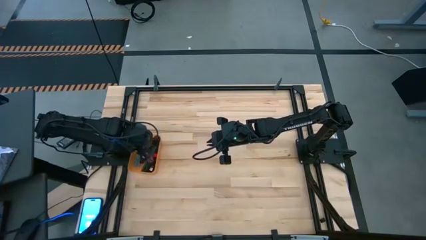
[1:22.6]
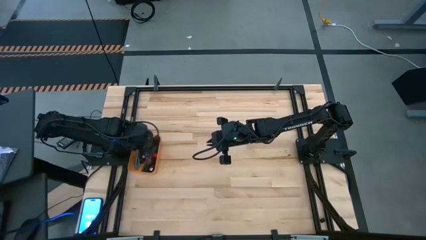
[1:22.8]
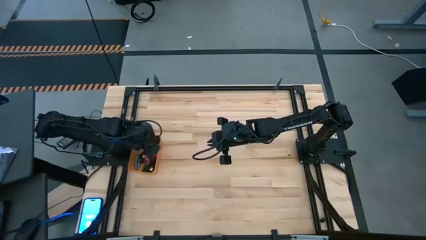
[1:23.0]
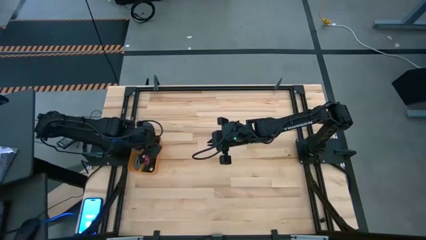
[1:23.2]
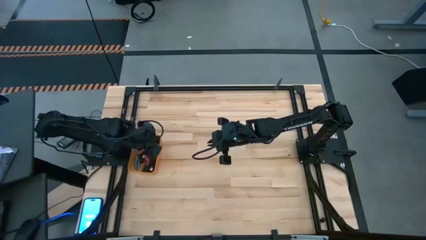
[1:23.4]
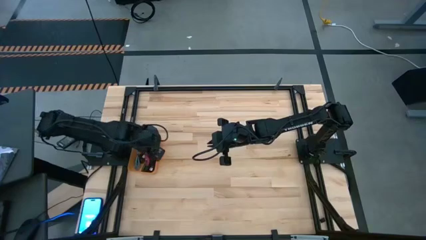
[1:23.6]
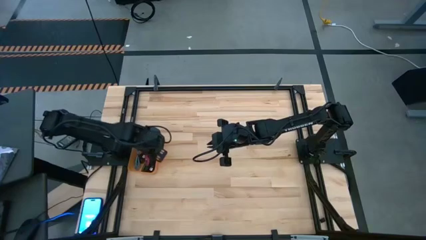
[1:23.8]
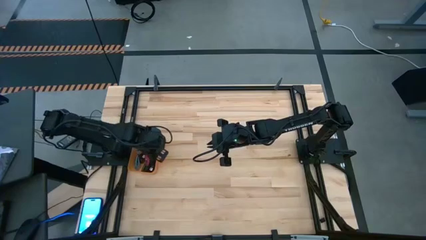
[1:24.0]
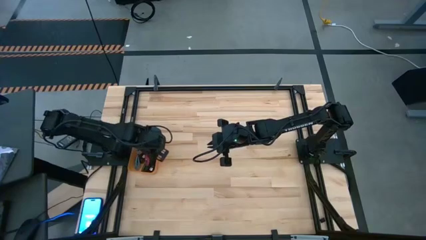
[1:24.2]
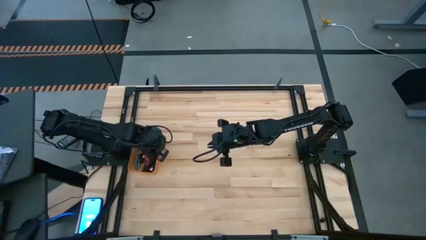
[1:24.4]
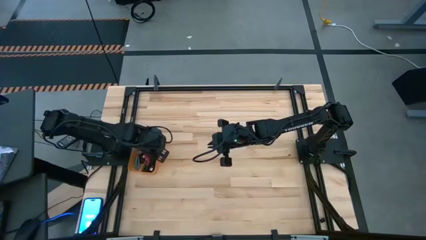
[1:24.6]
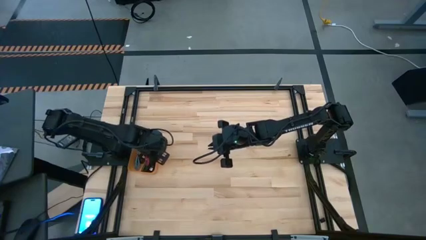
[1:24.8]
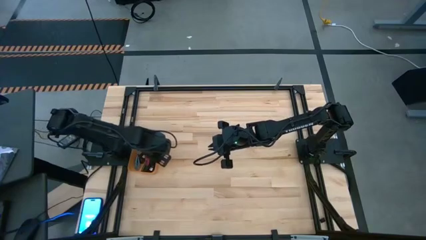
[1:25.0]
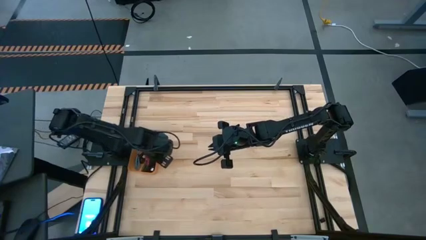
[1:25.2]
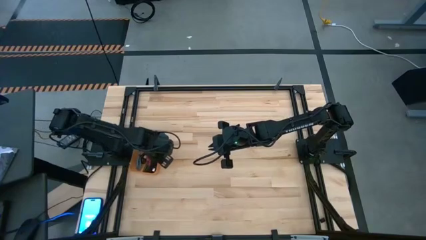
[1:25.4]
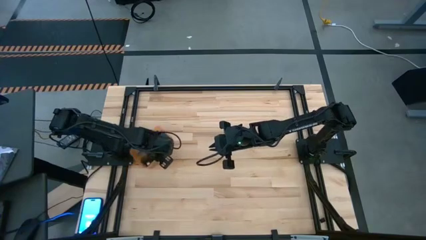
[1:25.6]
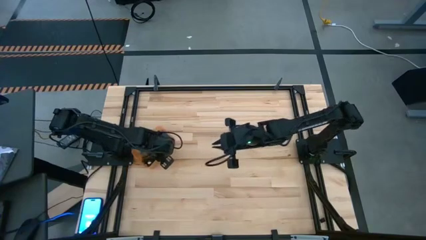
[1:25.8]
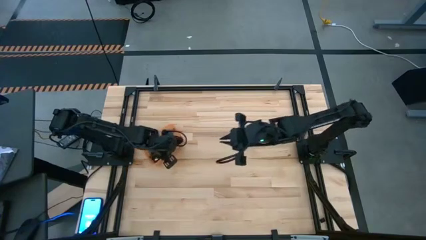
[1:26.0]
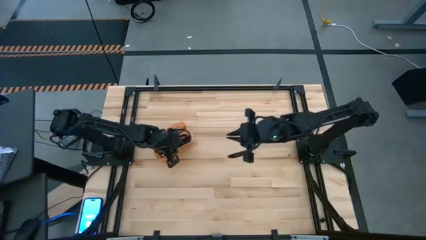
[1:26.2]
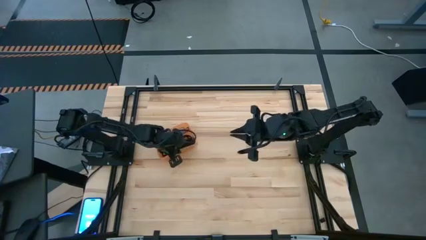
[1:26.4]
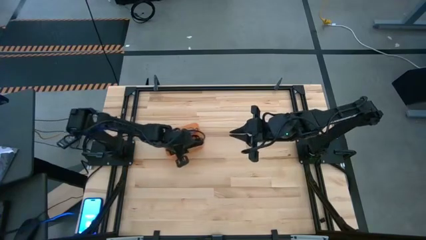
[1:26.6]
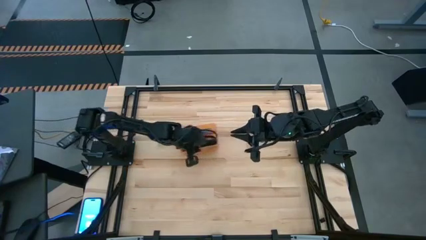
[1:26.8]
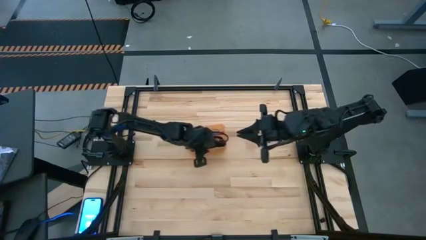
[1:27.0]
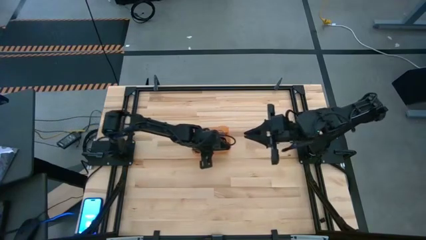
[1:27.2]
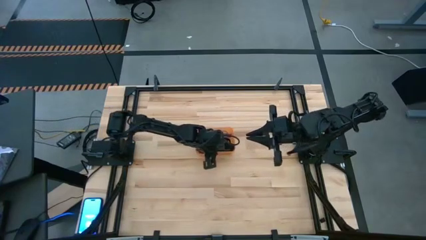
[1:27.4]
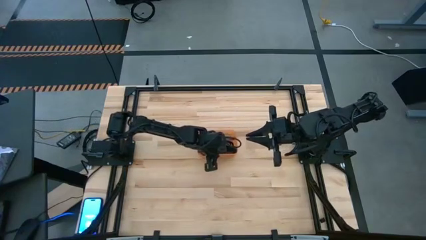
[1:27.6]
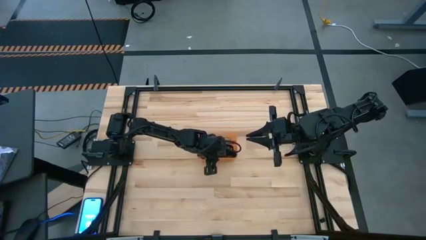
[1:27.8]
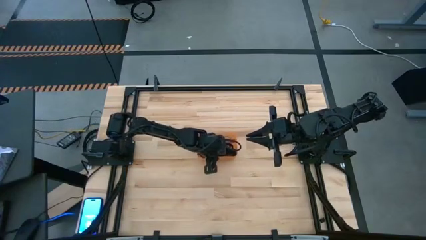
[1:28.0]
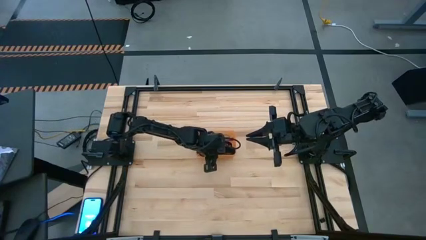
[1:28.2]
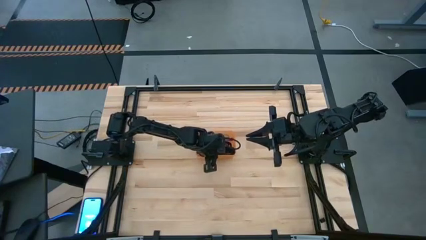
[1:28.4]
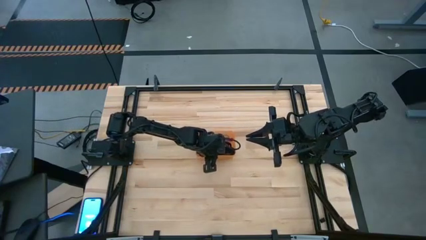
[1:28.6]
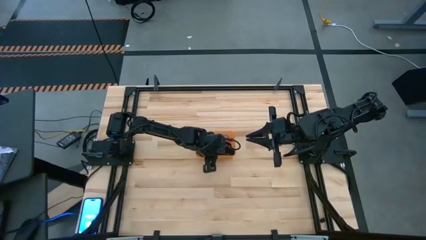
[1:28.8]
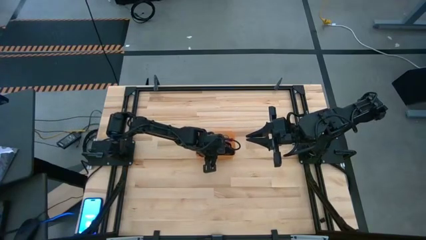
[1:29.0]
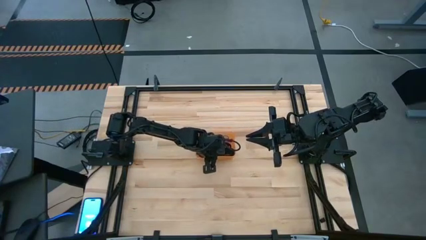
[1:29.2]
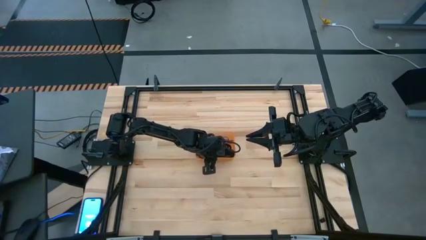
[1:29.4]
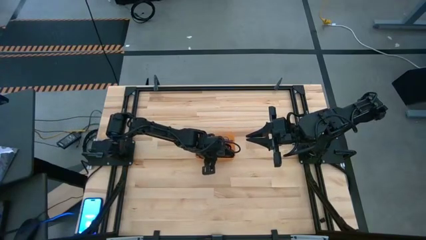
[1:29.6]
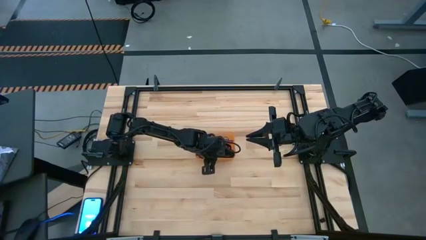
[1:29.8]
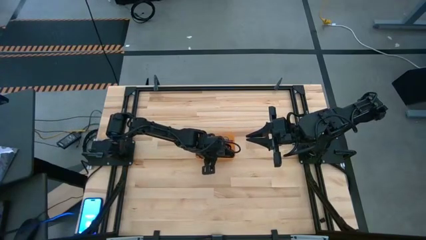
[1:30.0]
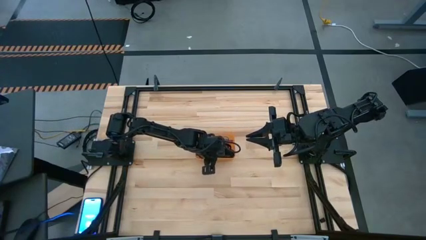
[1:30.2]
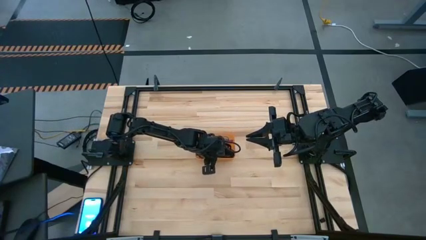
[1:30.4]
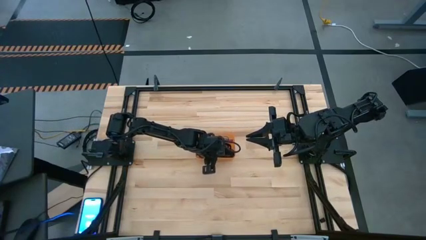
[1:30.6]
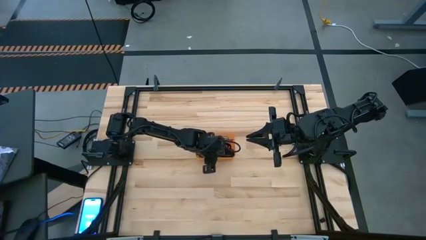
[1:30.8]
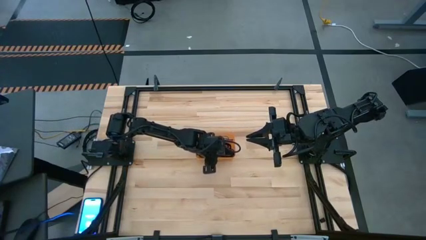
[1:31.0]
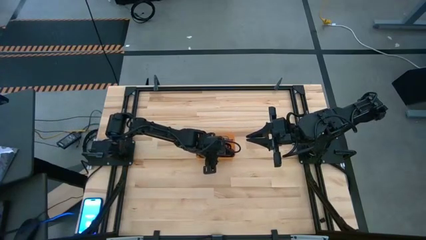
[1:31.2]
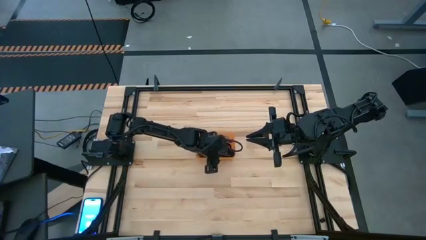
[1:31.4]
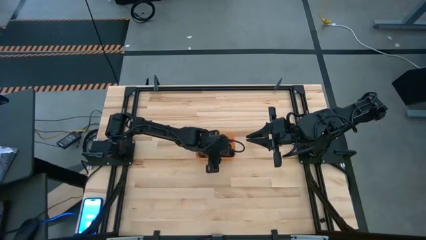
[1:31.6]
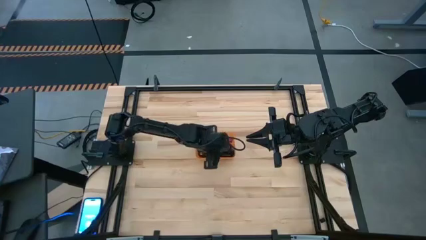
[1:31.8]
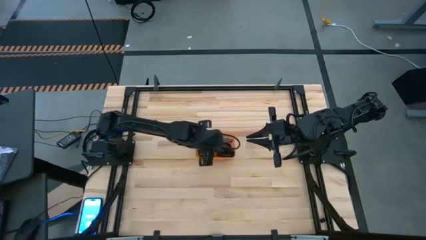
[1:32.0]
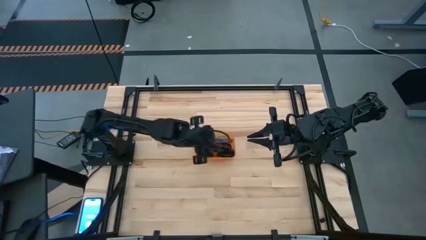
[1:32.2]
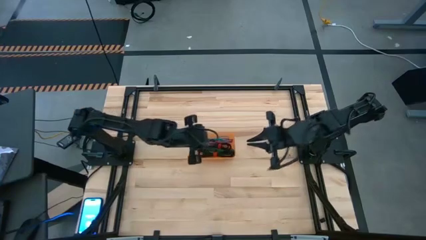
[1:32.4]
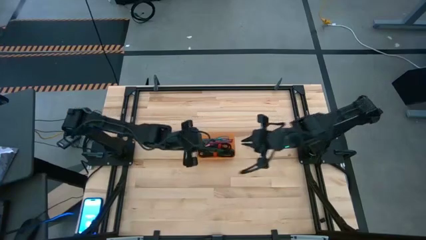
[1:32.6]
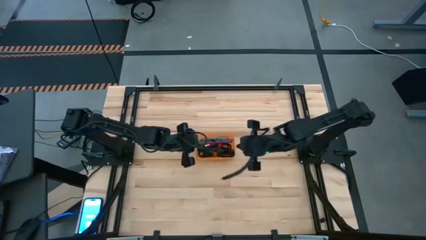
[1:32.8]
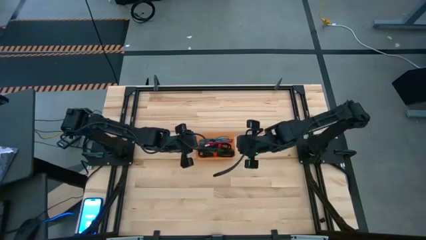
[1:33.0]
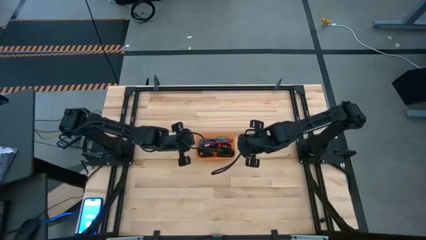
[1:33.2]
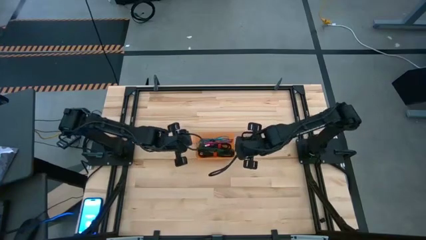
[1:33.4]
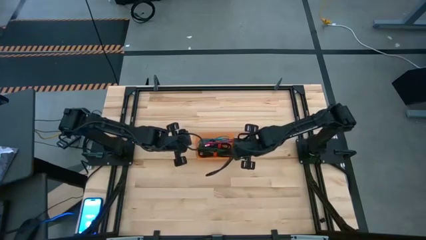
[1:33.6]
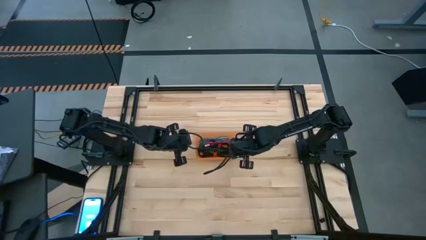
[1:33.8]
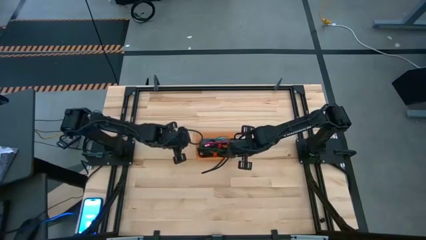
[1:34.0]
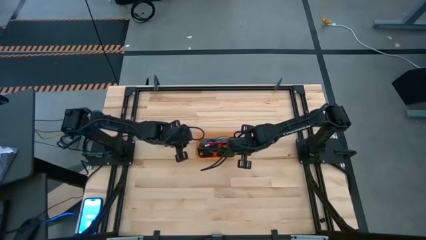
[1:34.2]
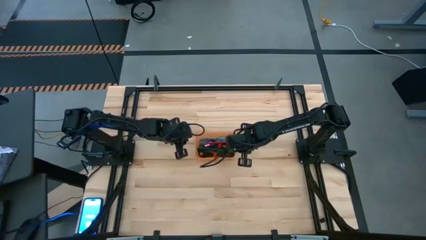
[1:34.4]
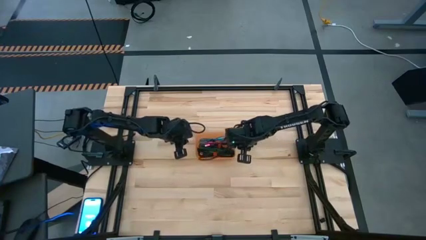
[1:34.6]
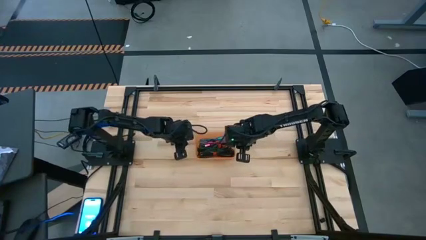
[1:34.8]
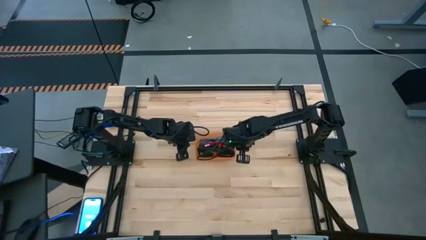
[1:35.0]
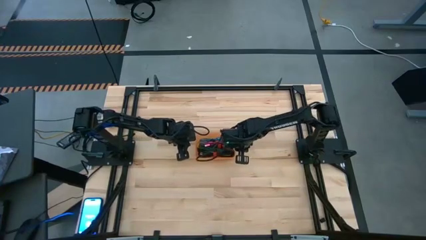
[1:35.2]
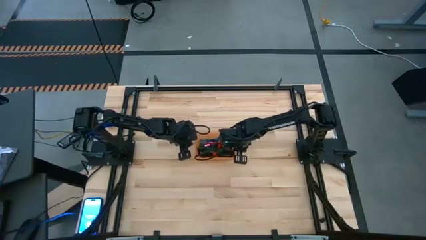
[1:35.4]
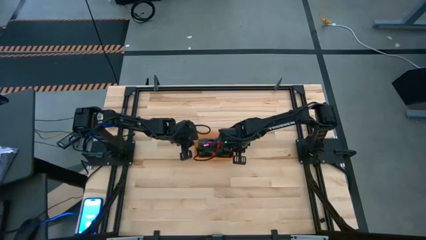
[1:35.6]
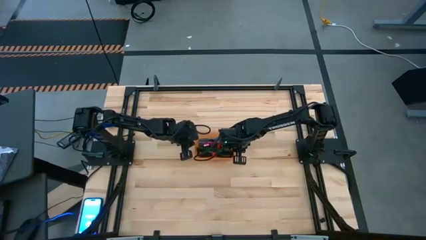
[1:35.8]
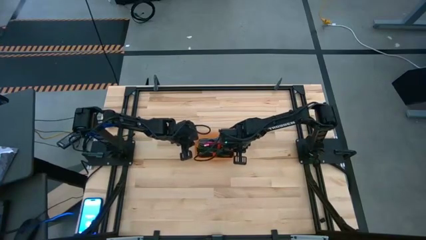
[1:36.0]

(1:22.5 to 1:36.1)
Task: Pick and place USB-C Cables
Move the orange bin to the middle of the table

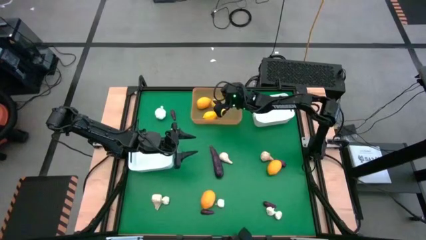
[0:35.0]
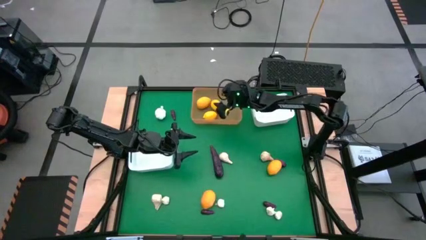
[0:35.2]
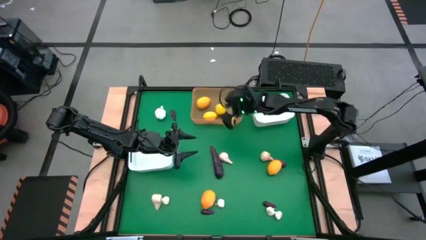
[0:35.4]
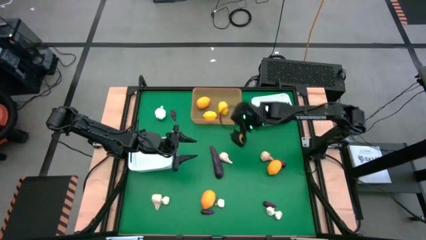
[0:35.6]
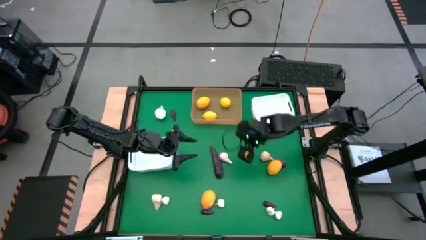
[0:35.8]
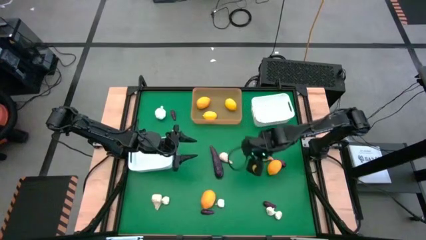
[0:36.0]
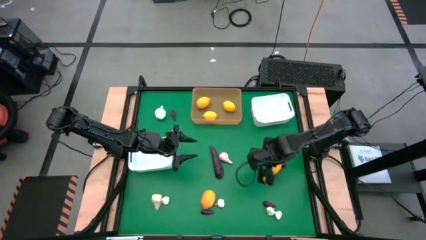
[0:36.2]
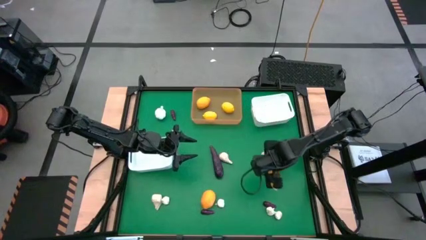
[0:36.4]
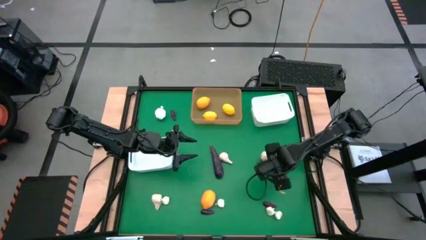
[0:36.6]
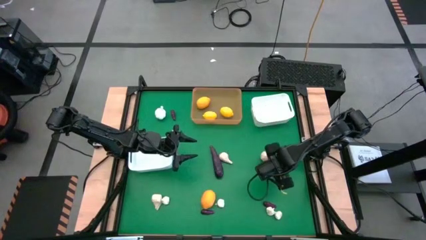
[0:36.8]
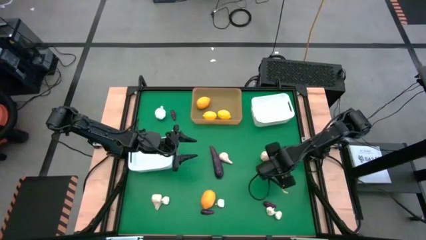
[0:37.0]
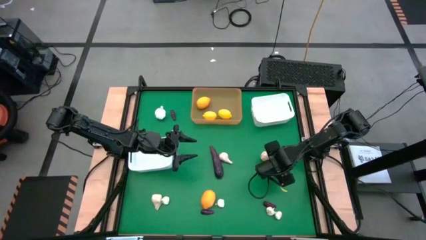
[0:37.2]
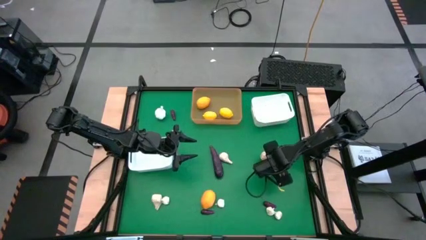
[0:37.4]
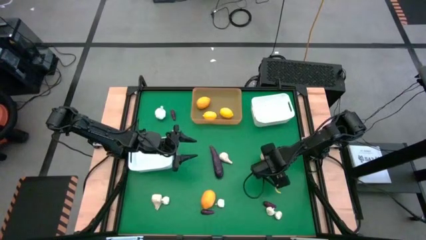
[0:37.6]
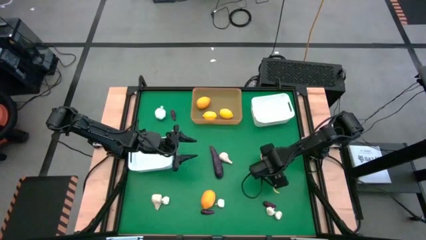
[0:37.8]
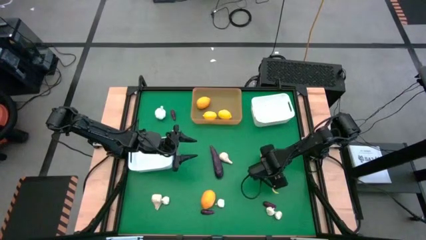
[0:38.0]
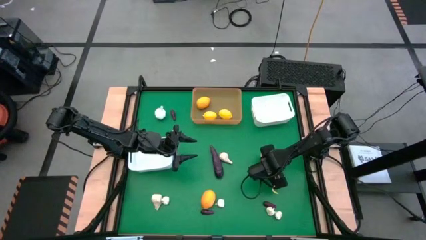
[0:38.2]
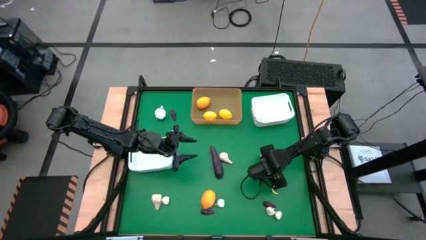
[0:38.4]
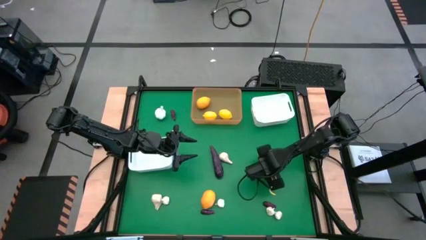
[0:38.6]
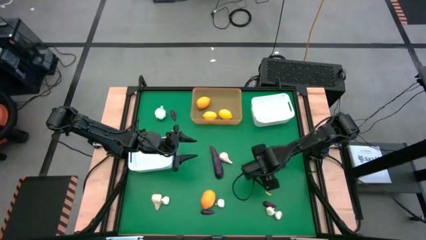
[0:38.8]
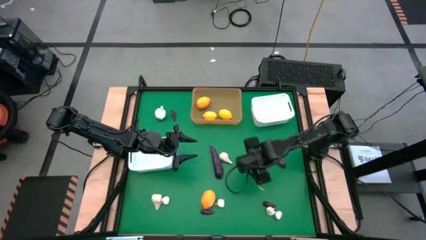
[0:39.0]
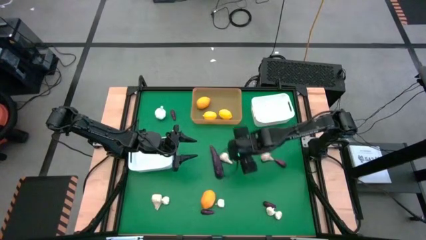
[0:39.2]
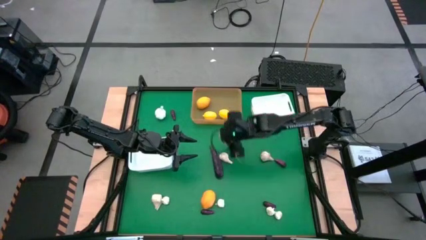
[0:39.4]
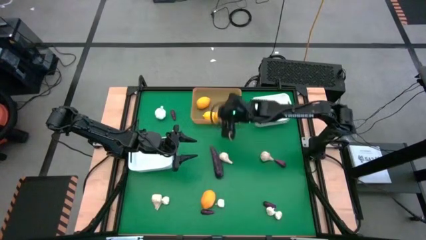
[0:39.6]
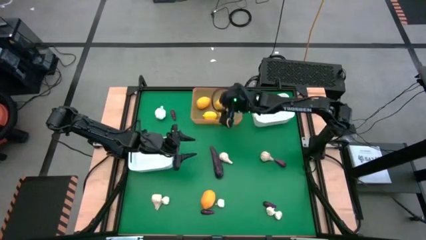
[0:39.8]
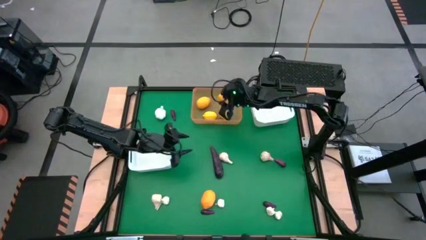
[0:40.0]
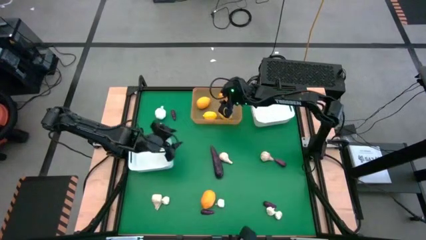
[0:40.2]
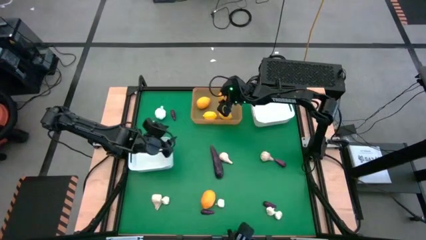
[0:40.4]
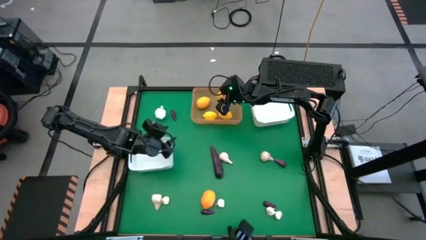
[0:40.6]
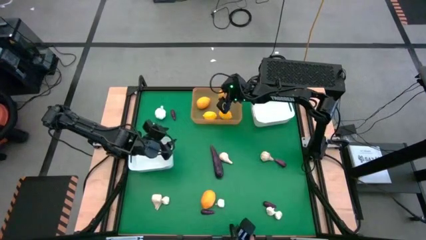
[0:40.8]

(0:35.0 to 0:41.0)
Task: Sort produce into baskets
Put the lemon into the yellow bin
